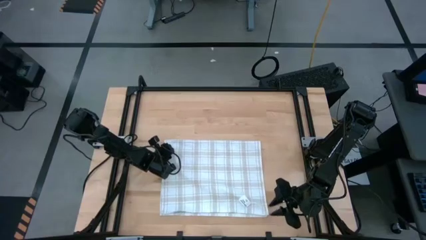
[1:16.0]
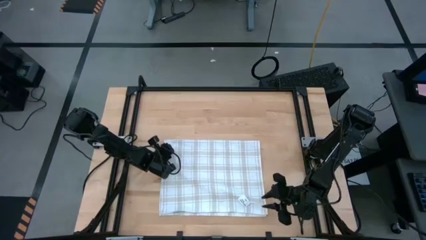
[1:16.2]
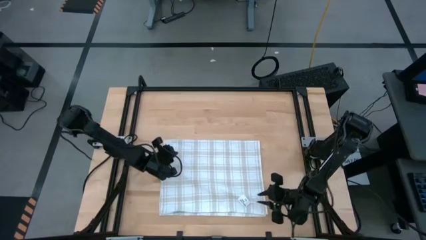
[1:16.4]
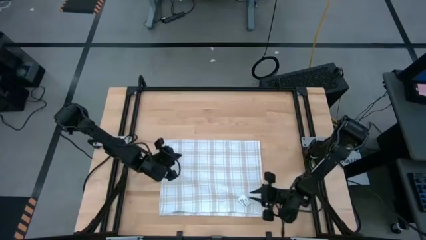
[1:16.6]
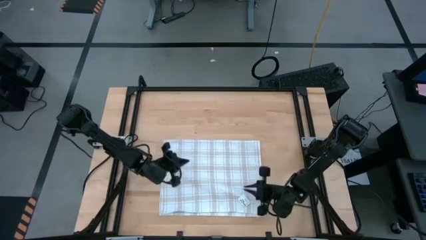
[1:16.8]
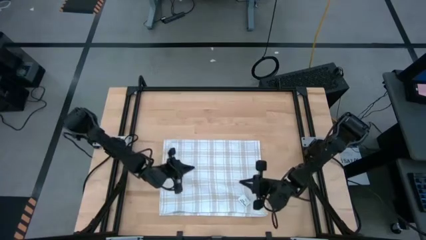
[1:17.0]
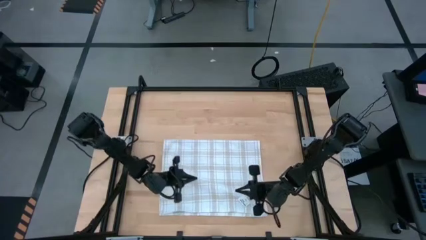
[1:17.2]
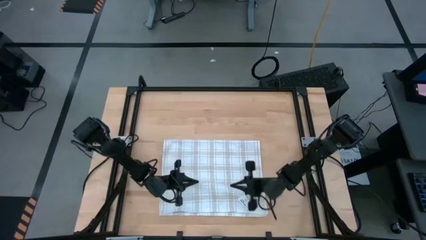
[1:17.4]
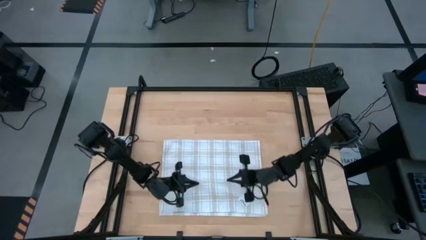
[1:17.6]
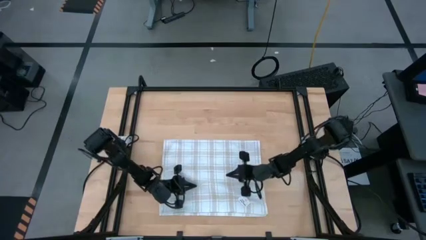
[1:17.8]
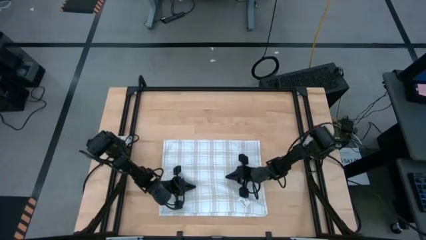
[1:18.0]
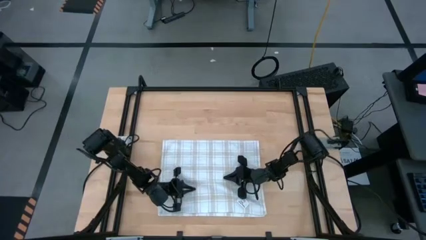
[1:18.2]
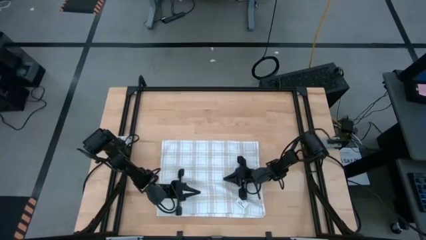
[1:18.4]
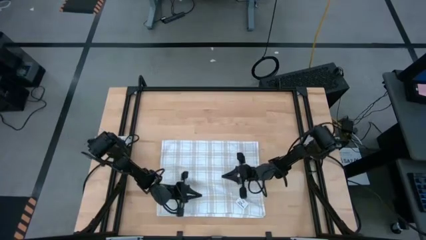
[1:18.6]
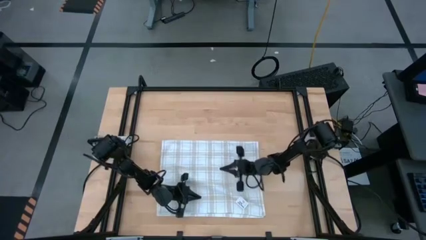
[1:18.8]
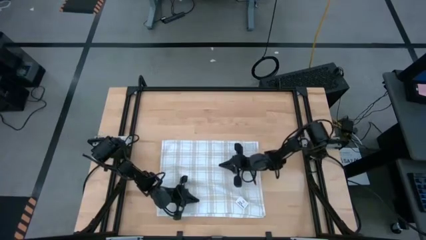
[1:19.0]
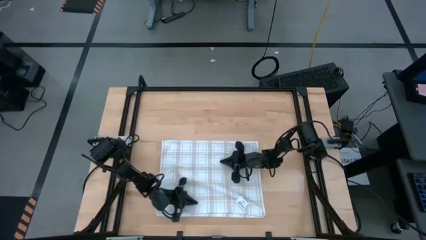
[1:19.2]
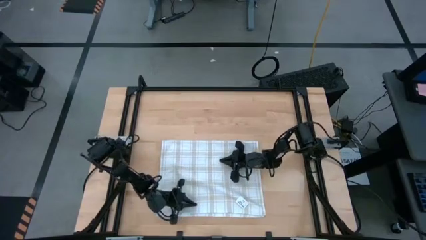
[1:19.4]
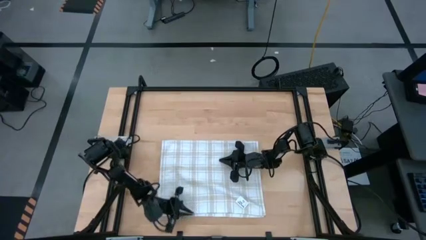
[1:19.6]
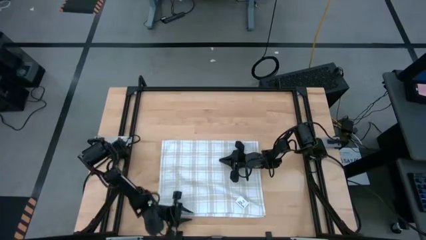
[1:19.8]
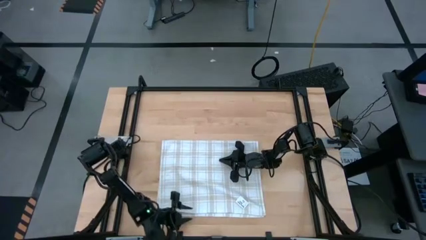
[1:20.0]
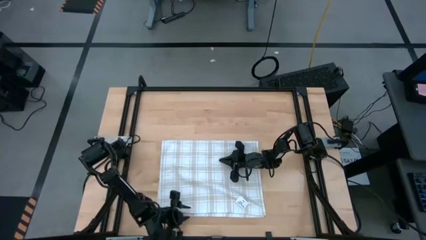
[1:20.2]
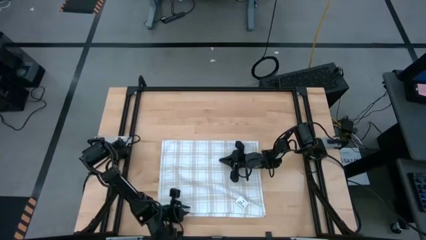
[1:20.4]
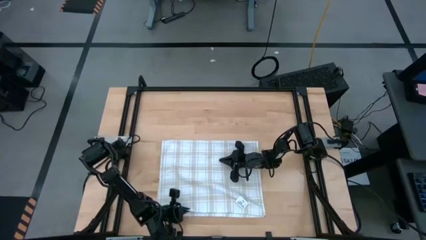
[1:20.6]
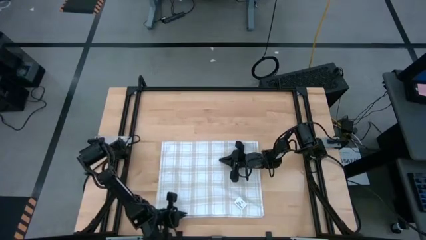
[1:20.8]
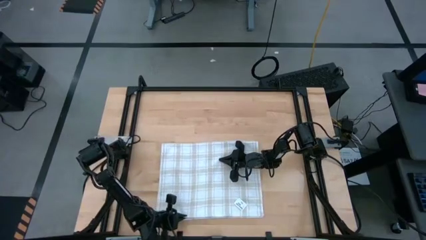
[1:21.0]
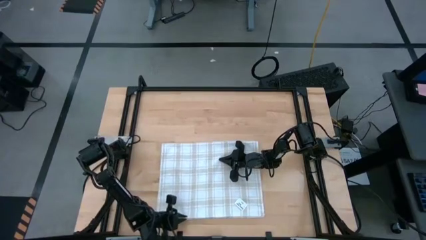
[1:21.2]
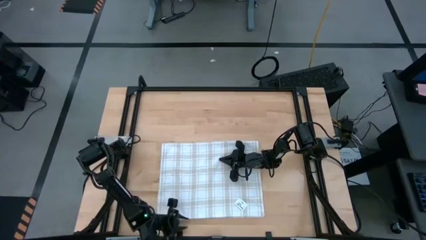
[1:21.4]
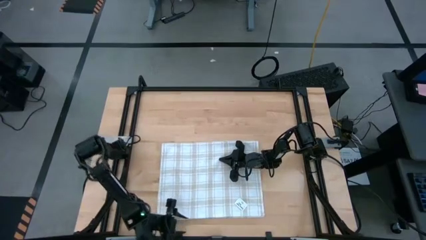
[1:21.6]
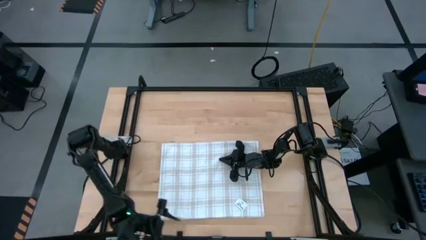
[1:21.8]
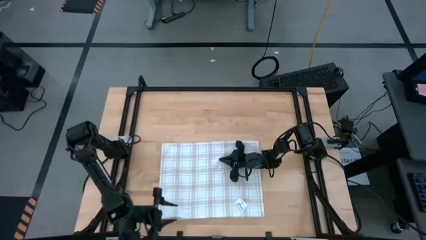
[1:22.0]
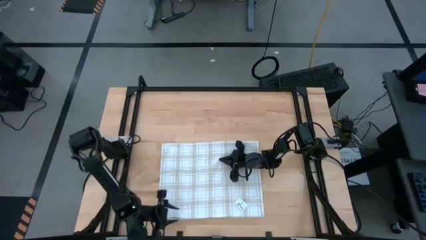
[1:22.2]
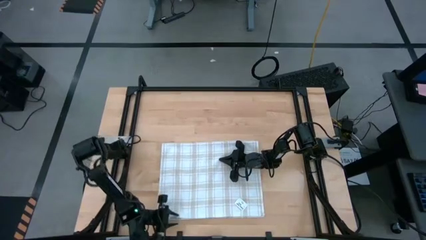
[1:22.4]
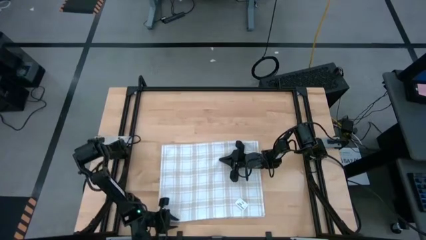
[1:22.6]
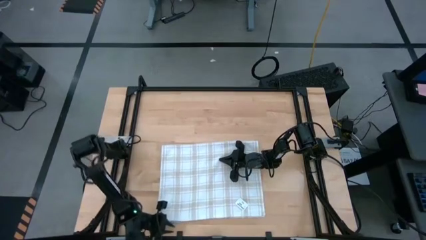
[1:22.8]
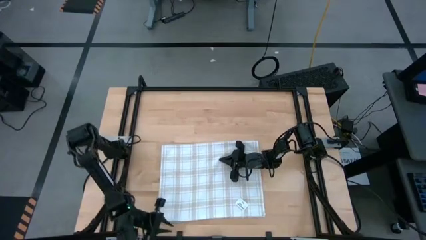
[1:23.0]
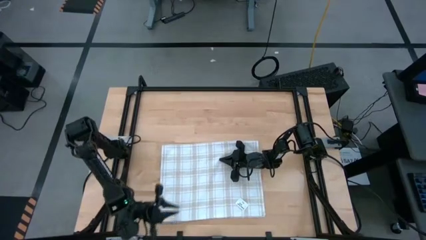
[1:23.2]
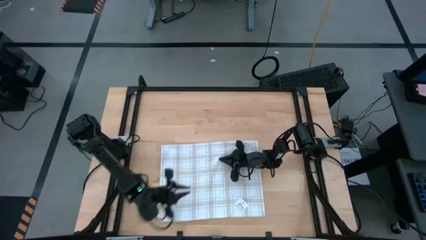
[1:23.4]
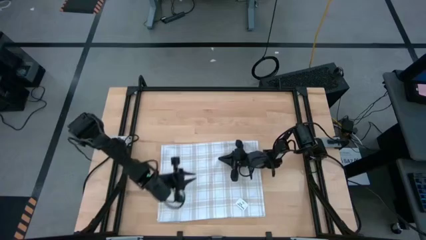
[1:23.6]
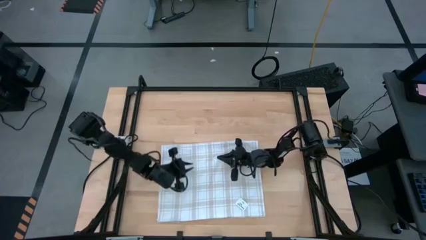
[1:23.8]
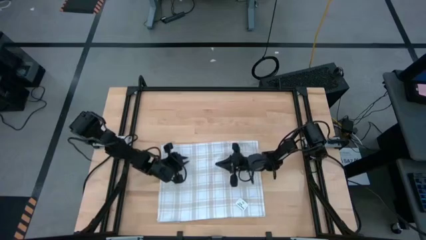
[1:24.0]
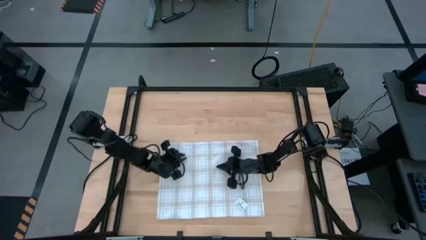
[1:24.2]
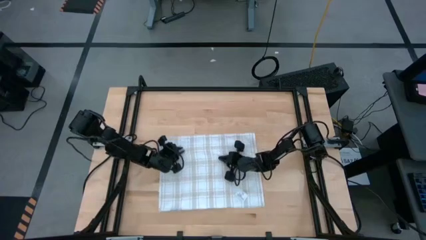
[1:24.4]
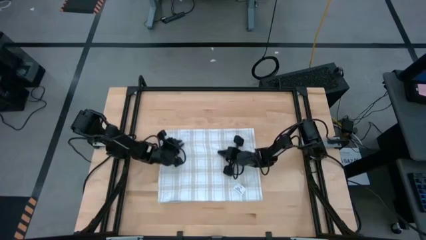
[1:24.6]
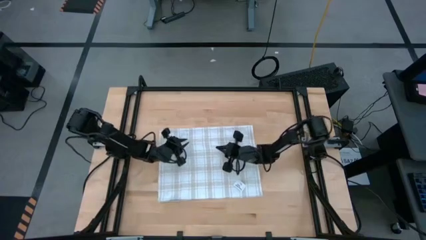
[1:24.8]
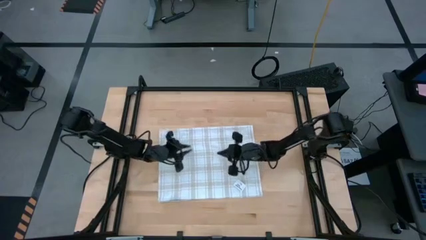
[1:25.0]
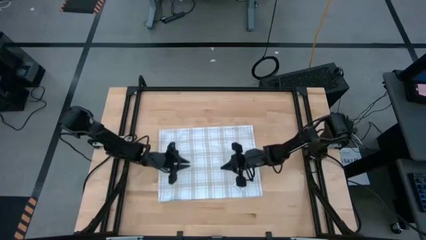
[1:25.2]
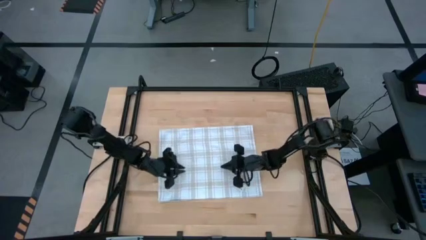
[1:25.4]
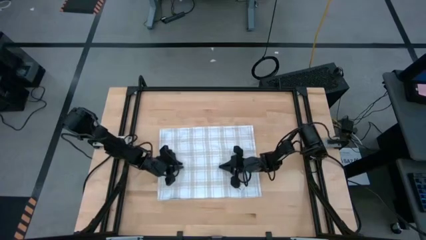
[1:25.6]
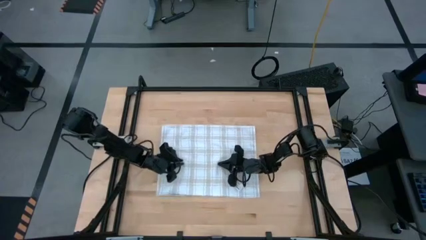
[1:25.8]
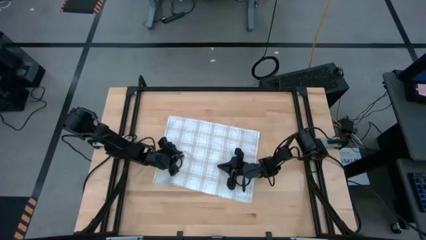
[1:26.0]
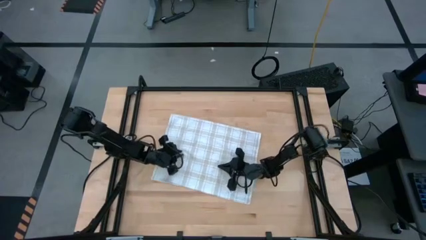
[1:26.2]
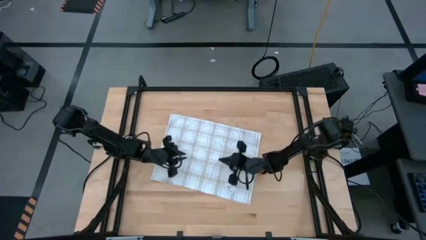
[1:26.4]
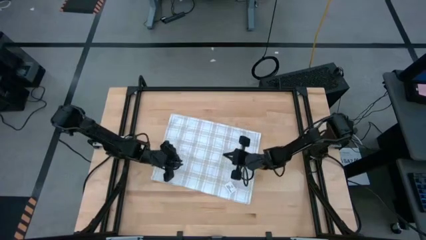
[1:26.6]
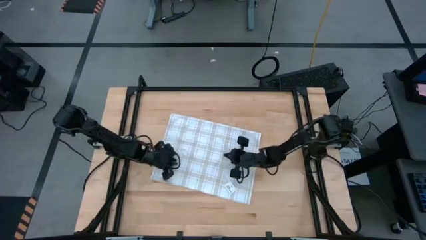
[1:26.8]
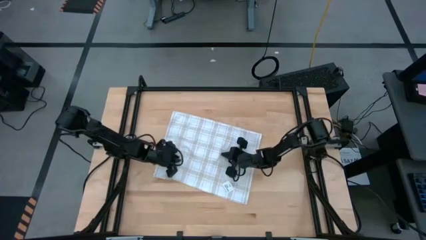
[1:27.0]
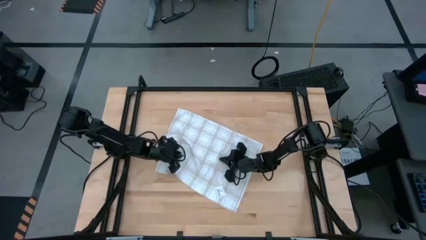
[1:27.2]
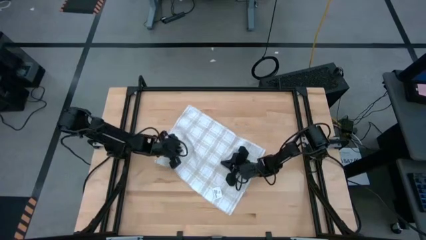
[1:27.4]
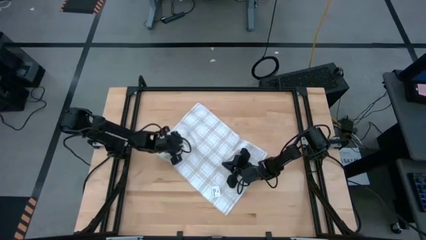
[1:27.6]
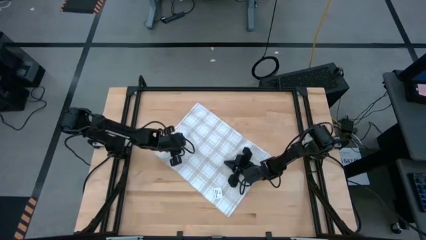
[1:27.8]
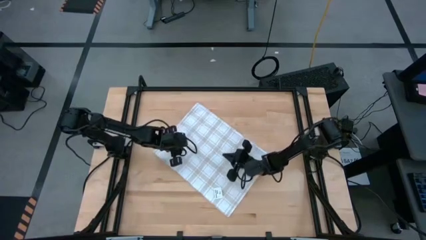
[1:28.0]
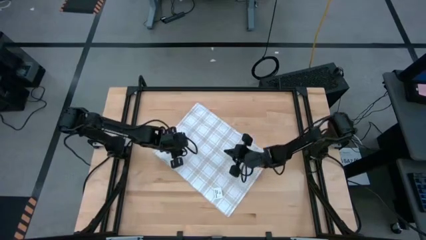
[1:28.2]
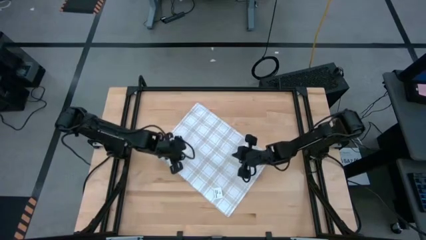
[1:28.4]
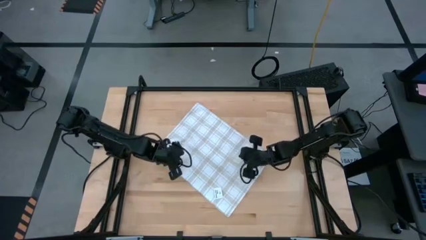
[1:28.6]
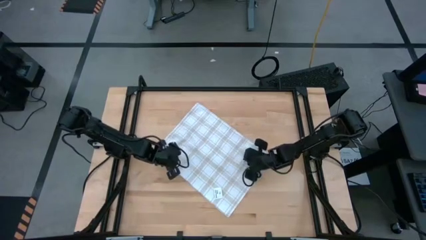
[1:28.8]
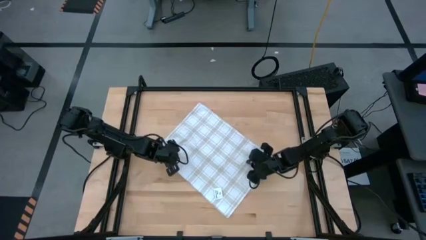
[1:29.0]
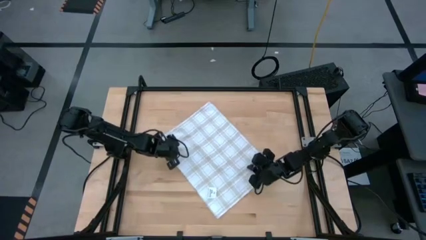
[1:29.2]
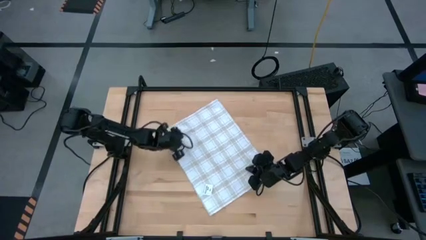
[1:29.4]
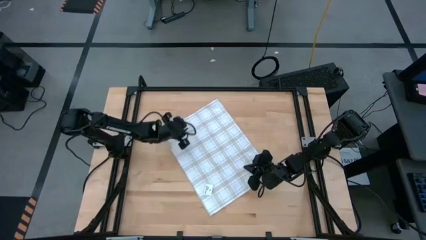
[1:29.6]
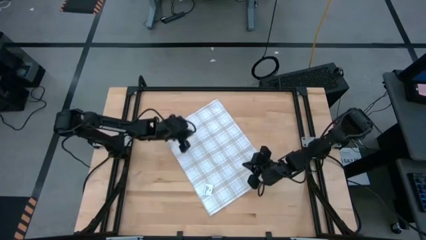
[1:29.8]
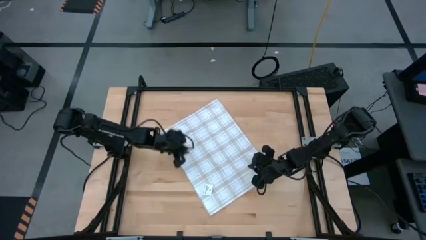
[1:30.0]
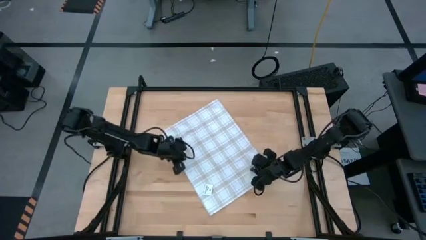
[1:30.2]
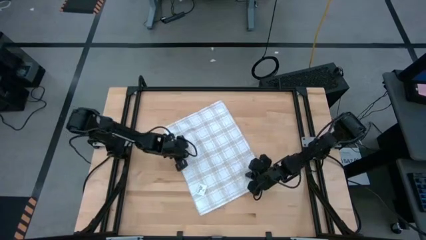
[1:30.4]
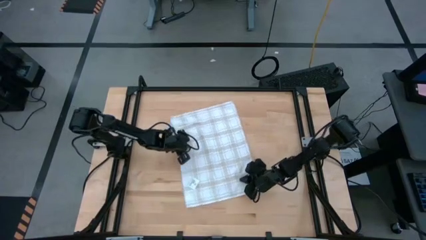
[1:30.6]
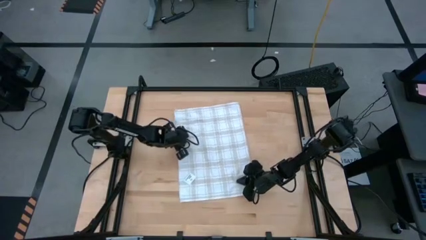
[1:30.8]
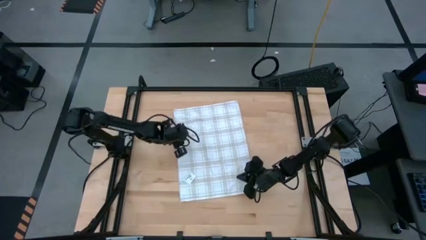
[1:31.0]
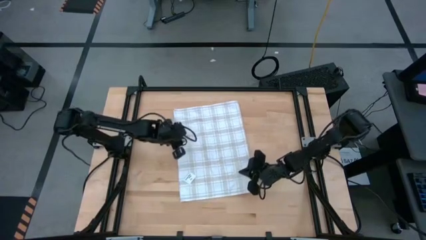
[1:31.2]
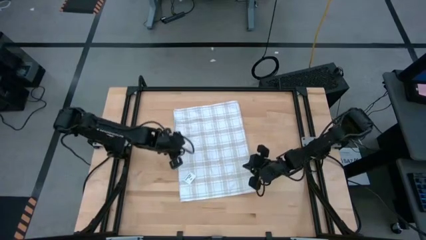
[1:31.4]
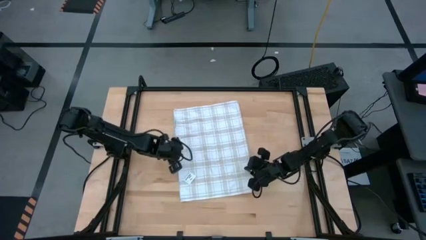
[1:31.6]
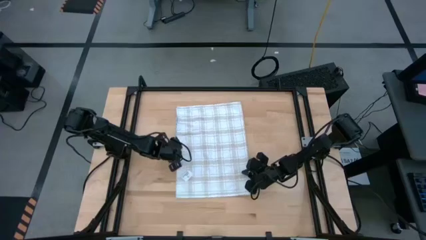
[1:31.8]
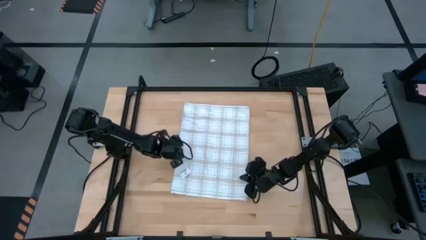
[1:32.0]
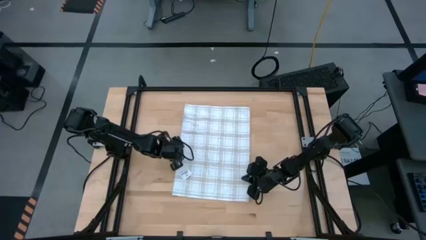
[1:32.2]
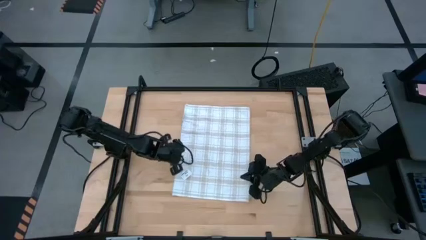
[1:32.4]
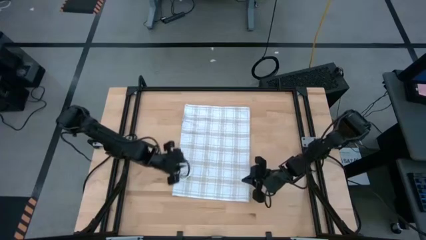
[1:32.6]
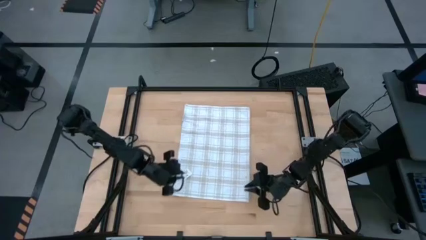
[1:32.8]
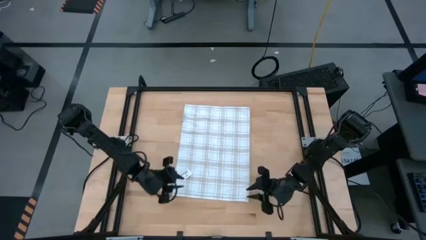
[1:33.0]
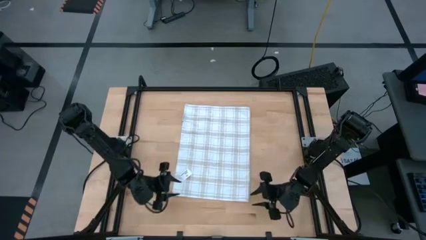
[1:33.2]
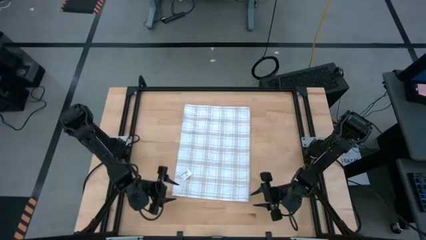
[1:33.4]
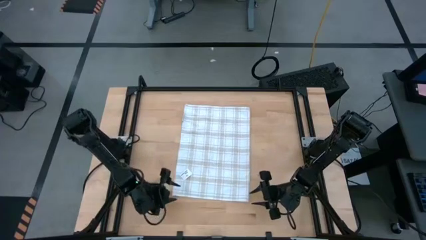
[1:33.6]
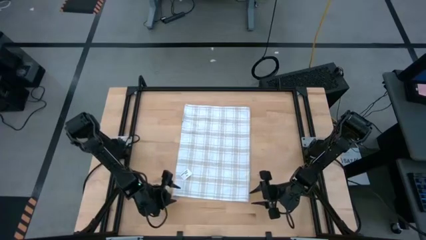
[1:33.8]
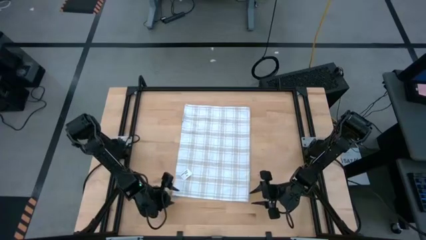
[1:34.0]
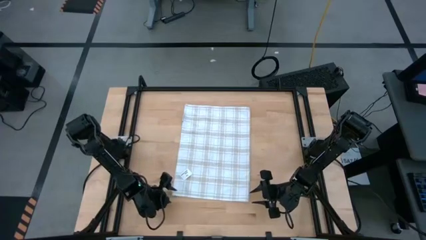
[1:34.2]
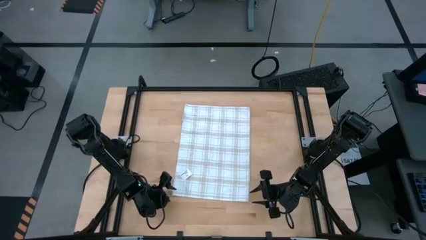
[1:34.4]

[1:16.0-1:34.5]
Task: Roll towel
Roll the white towel
